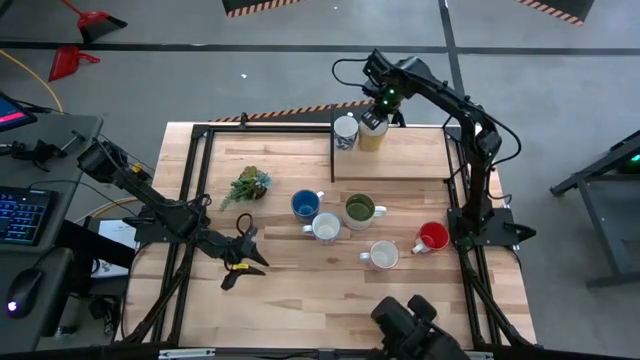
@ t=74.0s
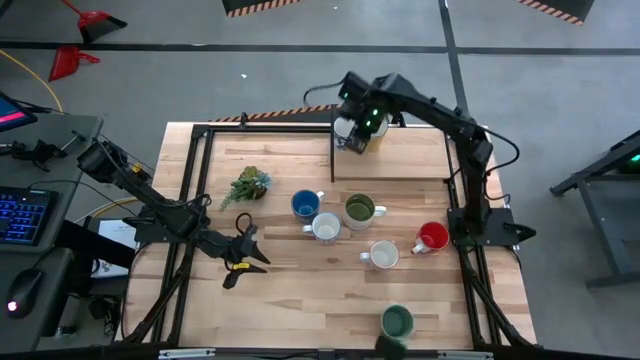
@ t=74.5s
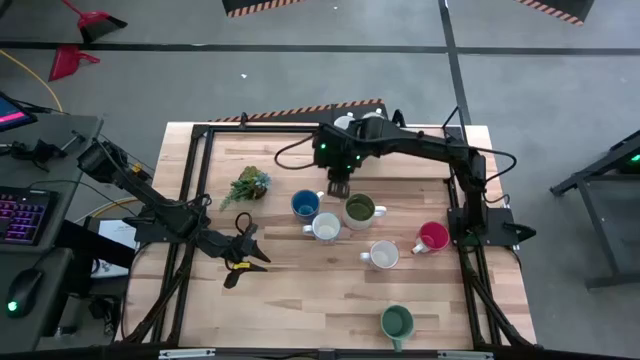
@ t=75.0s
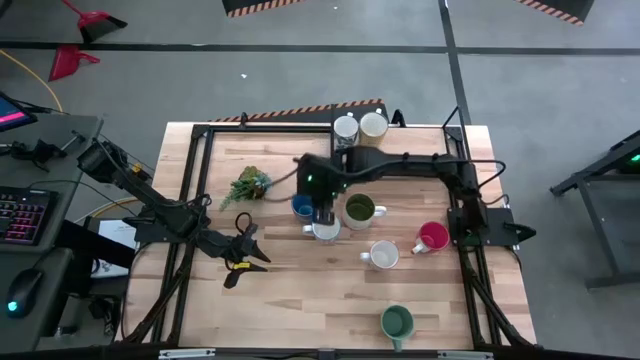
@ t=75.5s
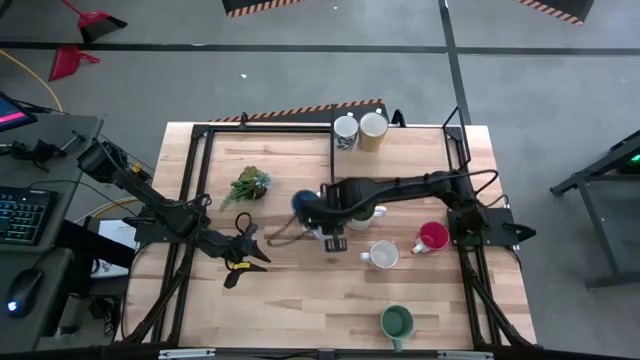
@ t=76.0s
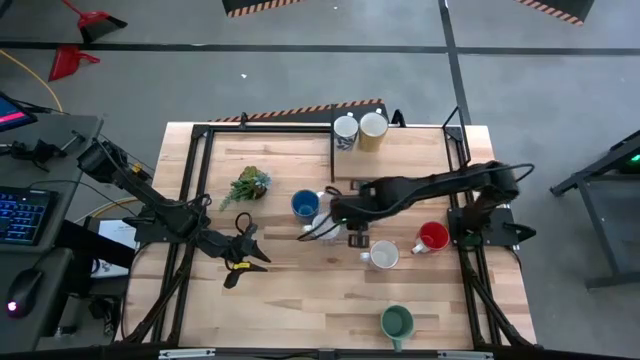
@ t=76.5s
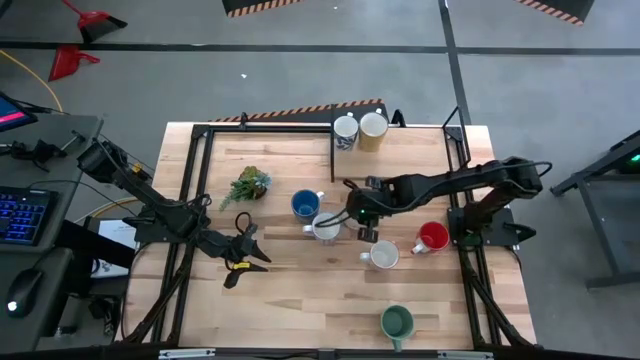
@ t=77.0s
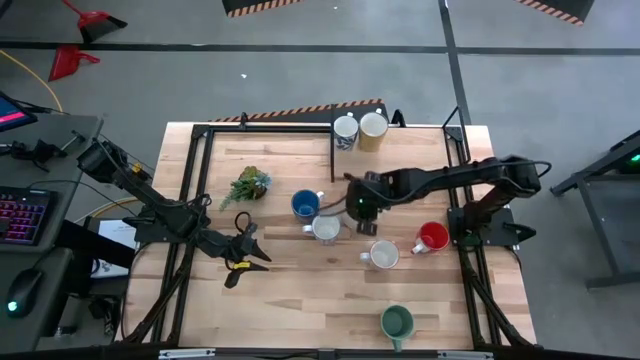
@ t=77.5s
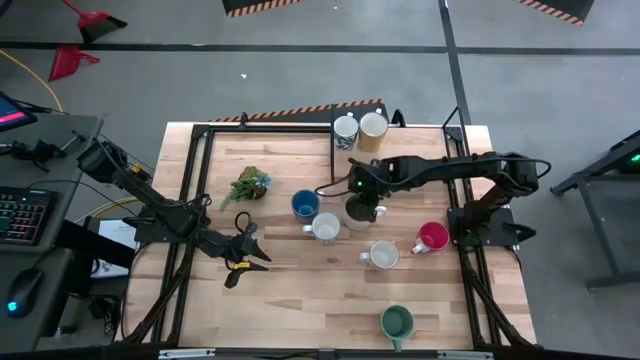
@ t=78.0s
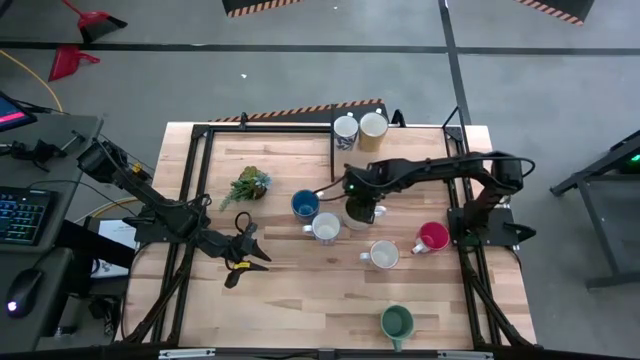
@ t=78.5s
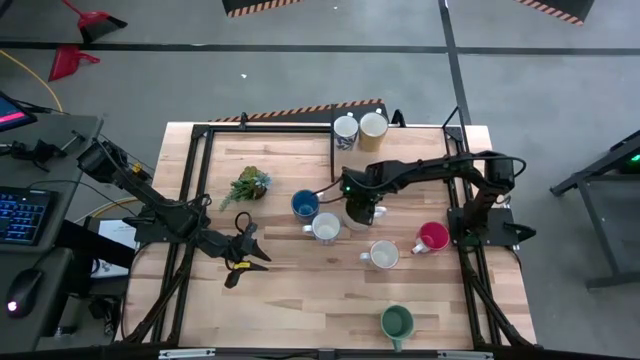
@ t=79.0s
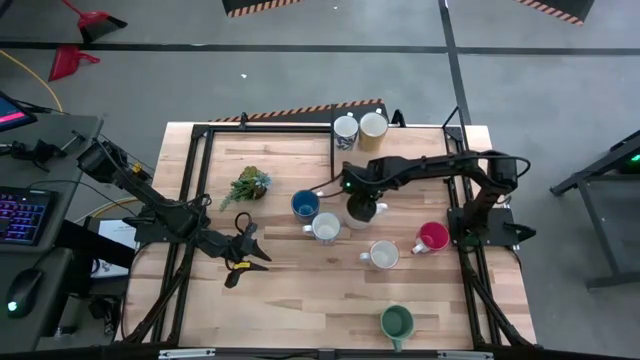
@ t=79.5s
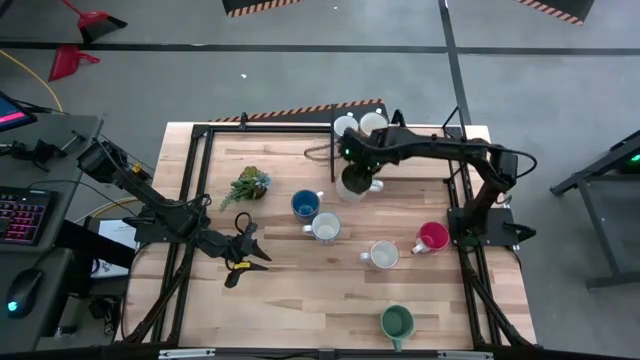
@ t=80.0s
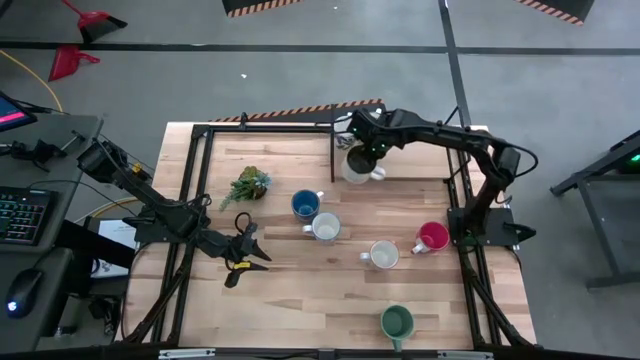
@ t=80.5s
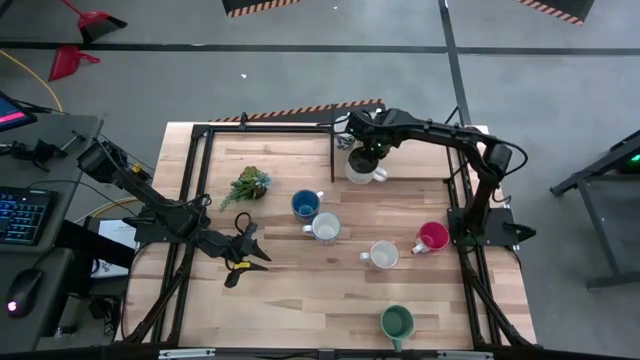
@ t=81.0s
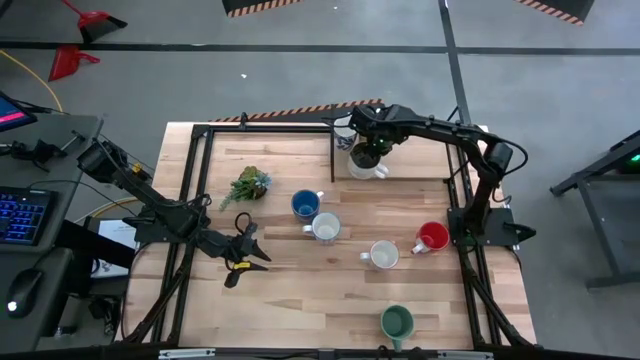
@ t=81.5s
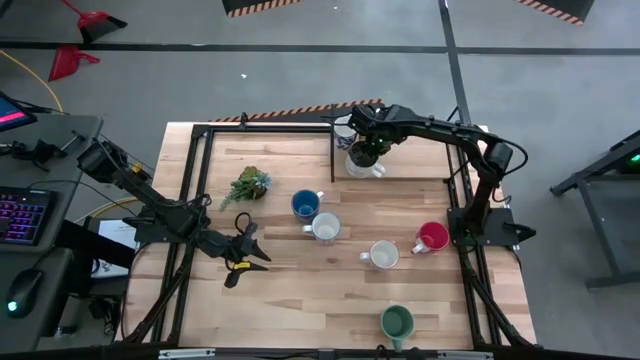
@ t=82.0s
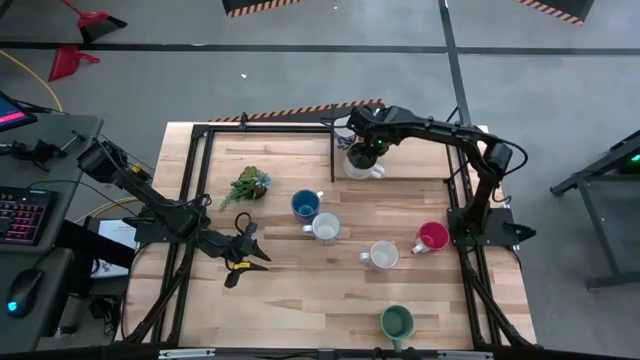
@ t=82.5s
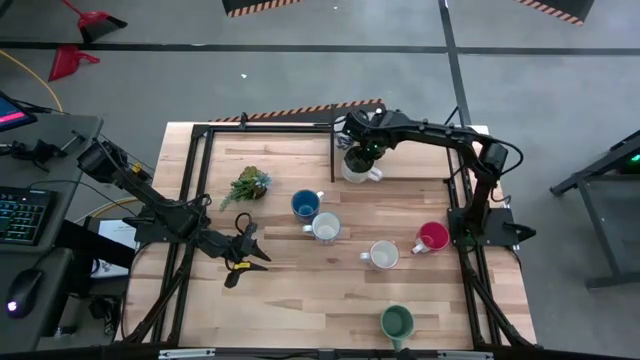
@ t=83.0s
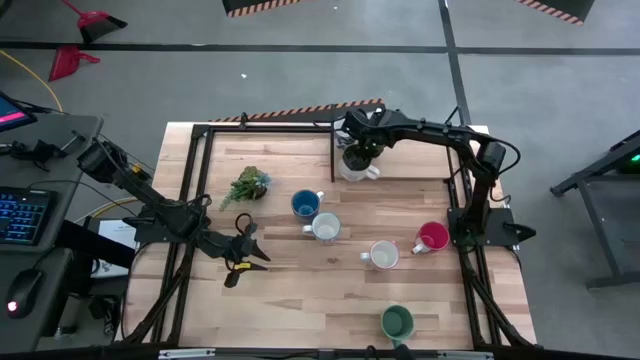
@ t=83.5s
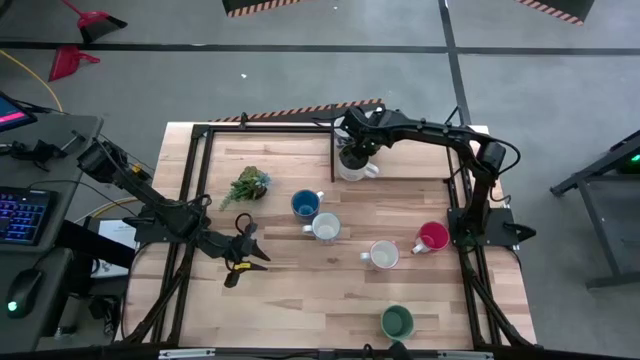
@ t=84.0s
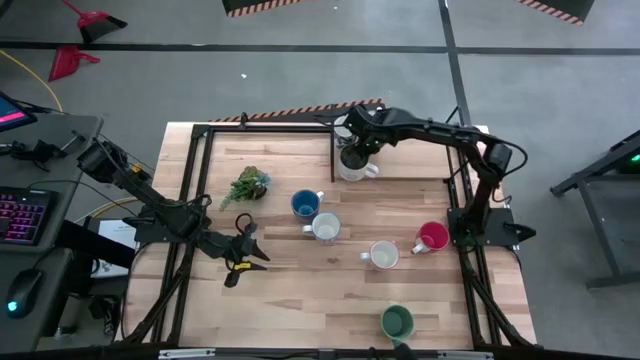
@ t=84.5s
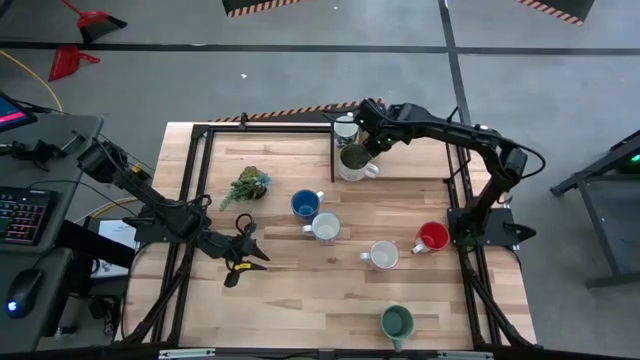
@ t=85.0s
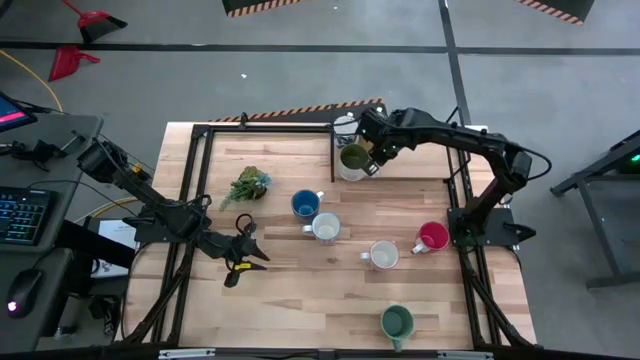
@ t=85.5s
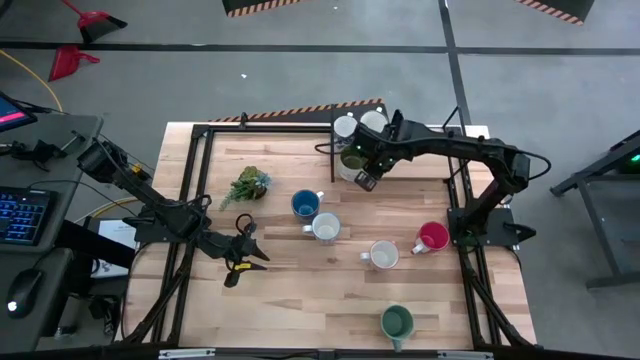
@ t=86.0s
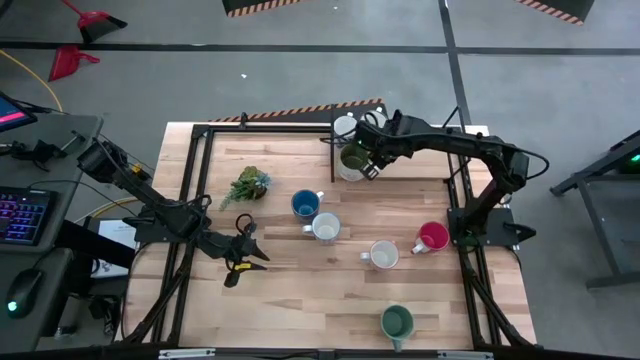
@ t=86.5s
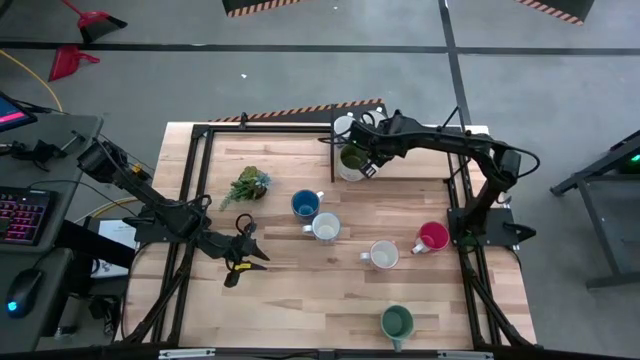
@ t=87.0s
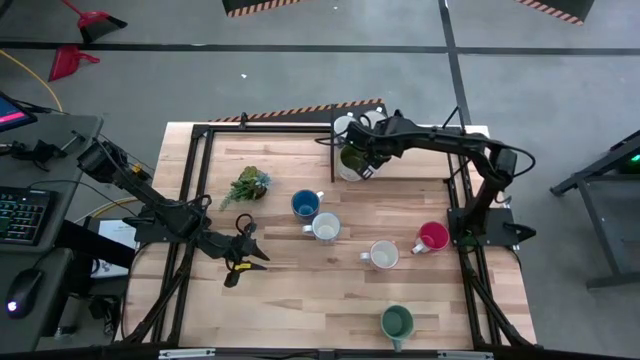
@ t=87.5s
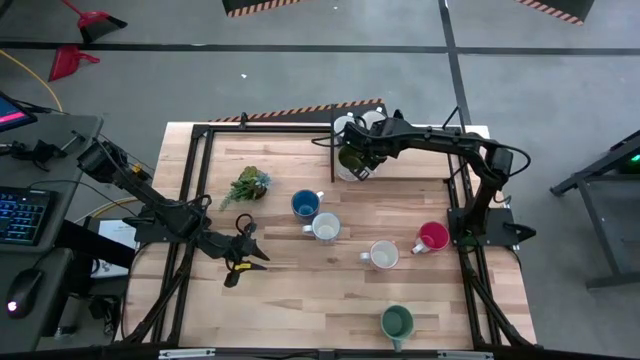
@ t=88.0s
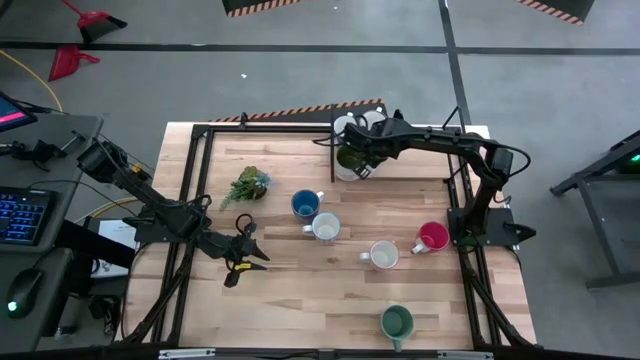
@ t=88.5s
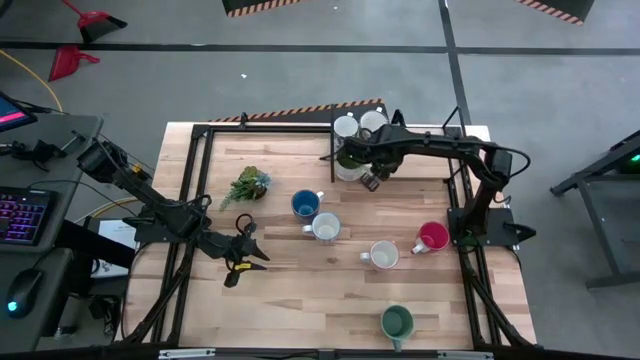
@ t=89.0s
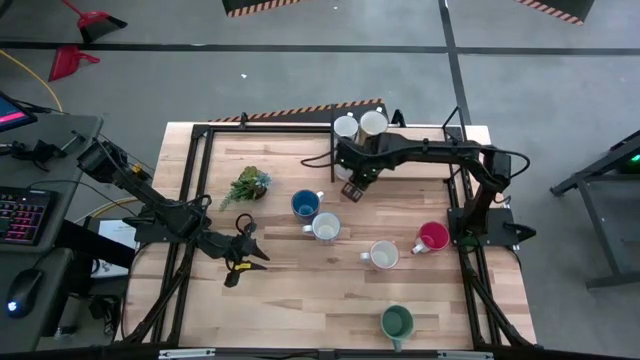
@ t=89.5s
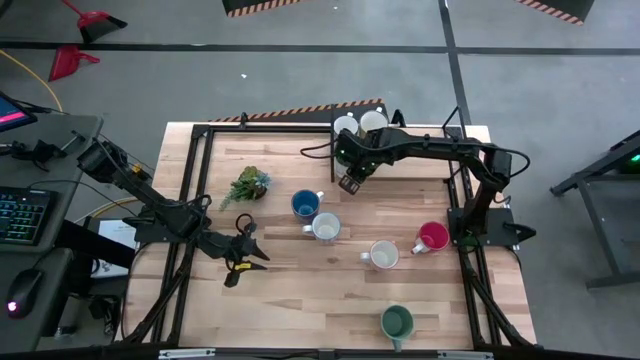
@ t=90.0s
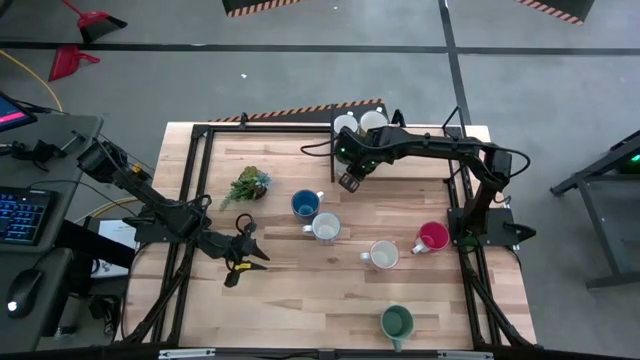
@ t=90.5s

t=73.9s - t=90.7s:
Task: Place coffee mugs
Put the white green mug on the shelf
